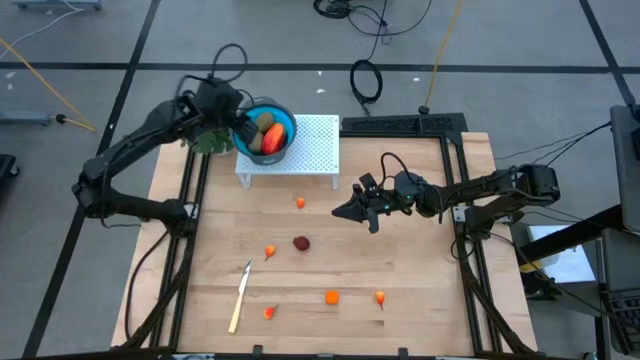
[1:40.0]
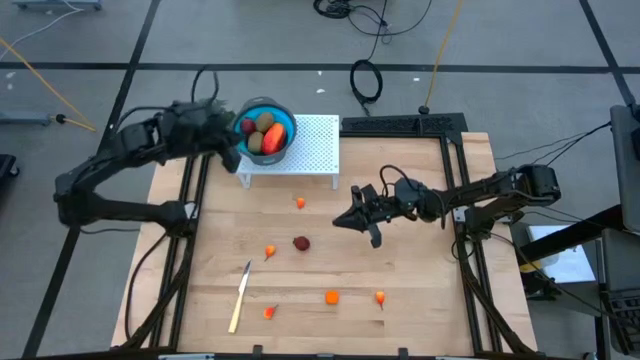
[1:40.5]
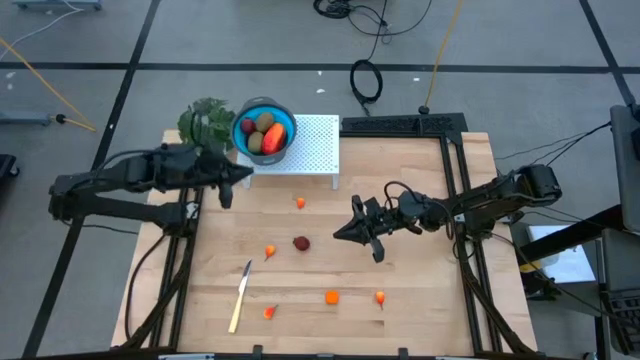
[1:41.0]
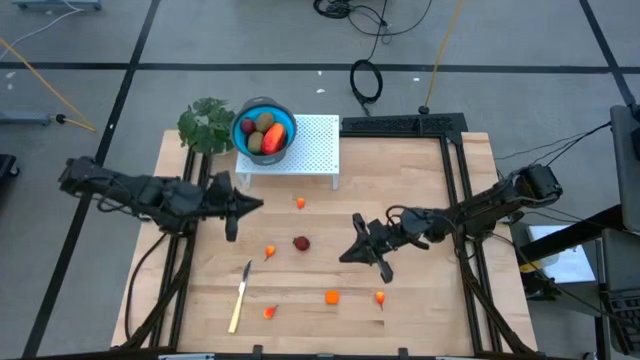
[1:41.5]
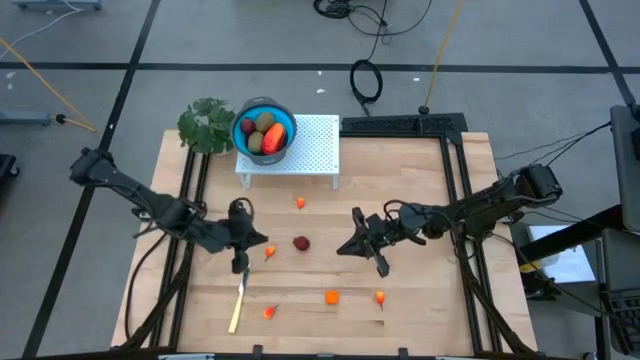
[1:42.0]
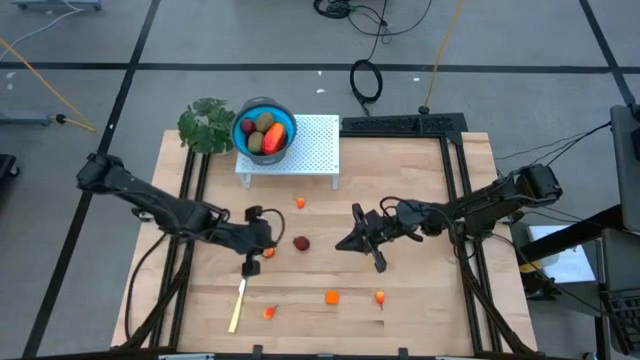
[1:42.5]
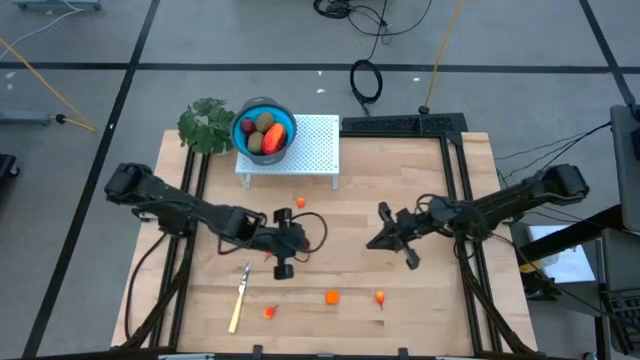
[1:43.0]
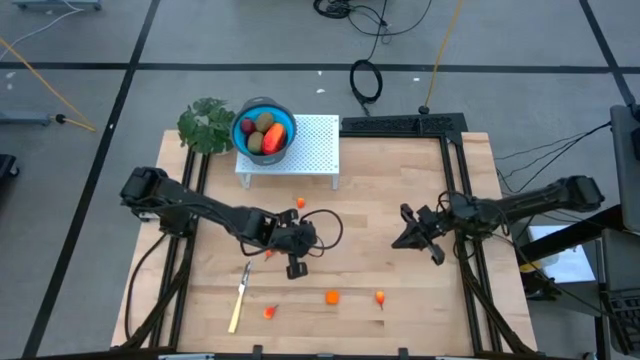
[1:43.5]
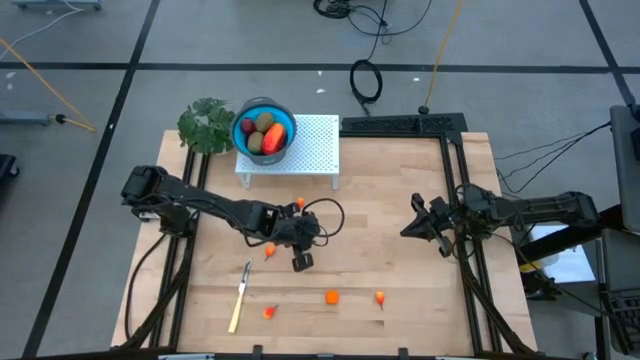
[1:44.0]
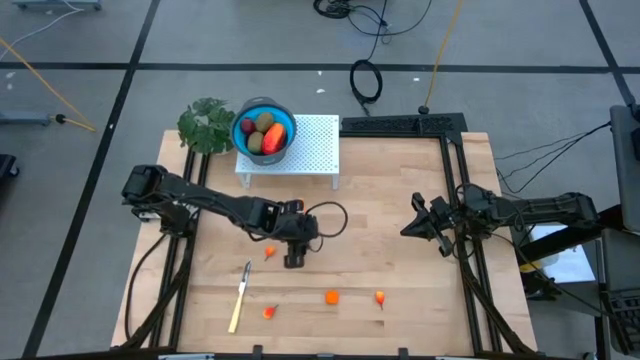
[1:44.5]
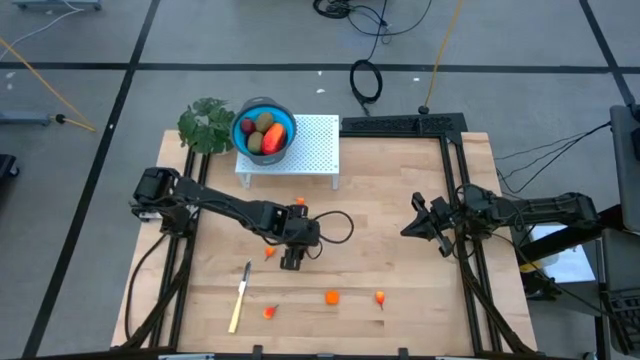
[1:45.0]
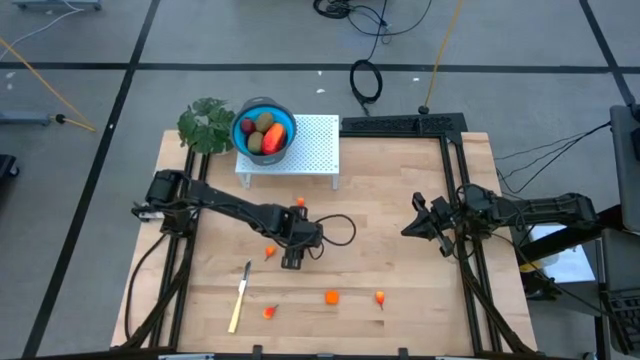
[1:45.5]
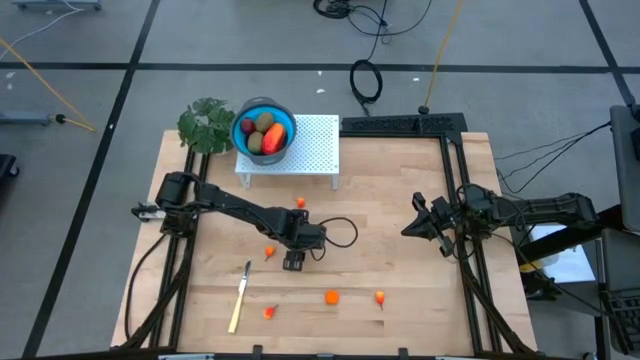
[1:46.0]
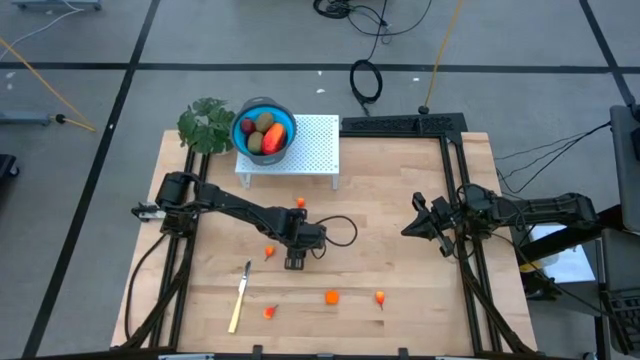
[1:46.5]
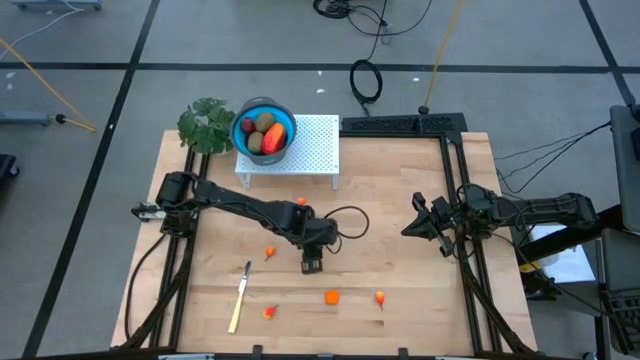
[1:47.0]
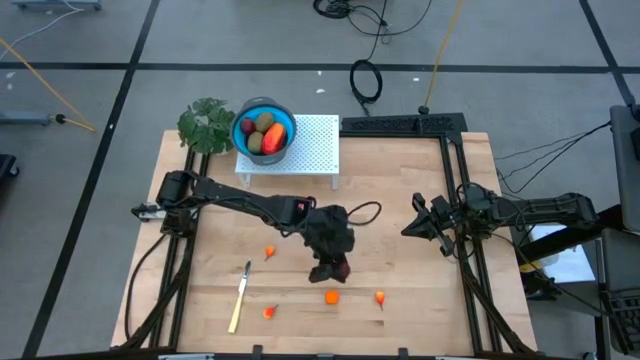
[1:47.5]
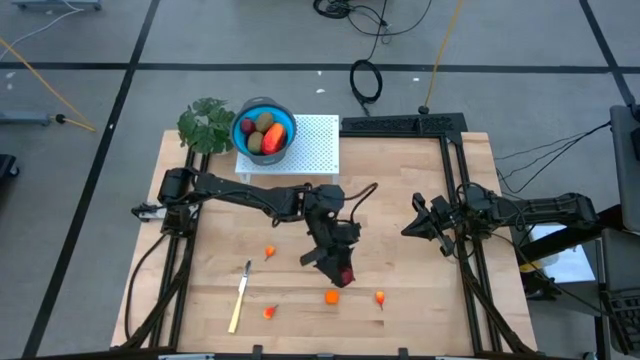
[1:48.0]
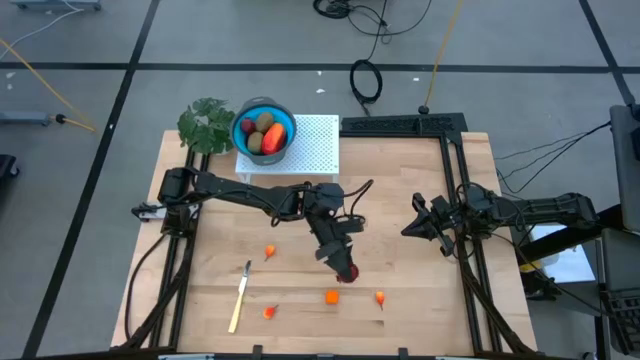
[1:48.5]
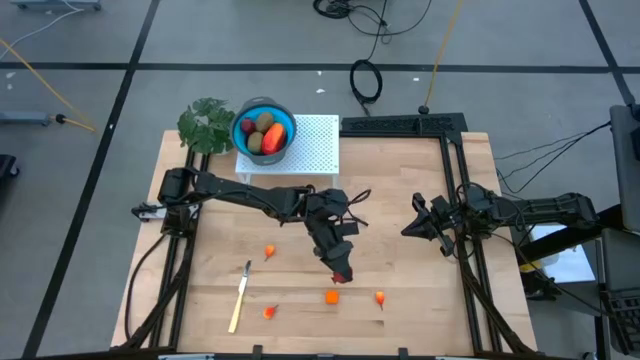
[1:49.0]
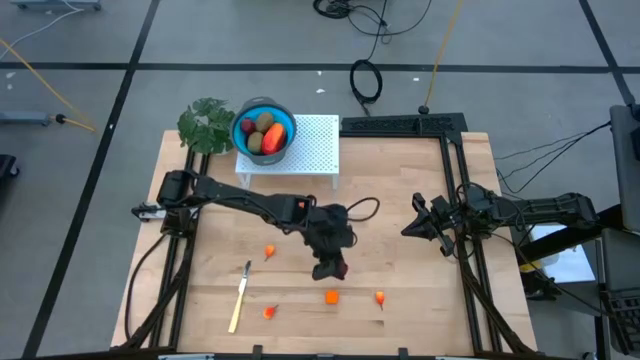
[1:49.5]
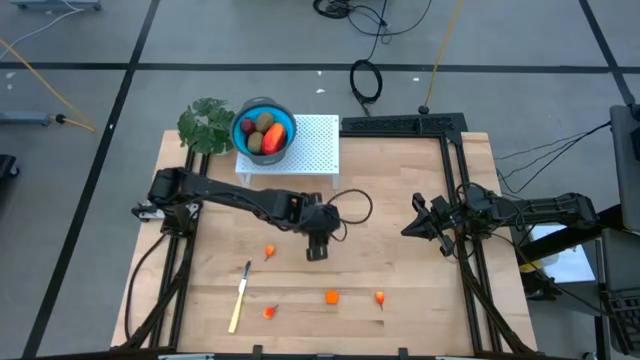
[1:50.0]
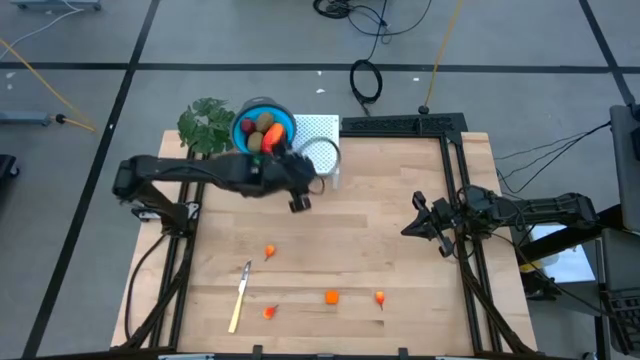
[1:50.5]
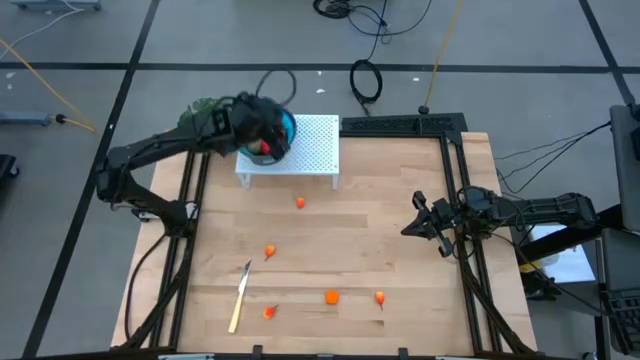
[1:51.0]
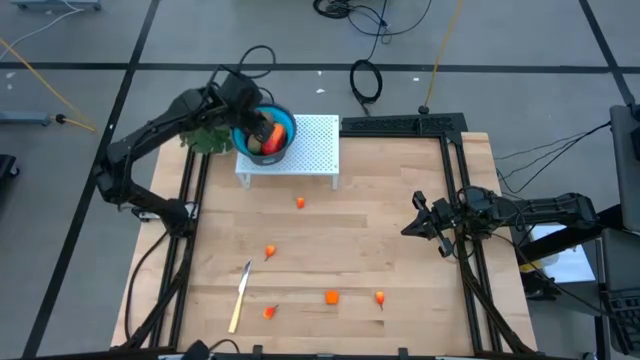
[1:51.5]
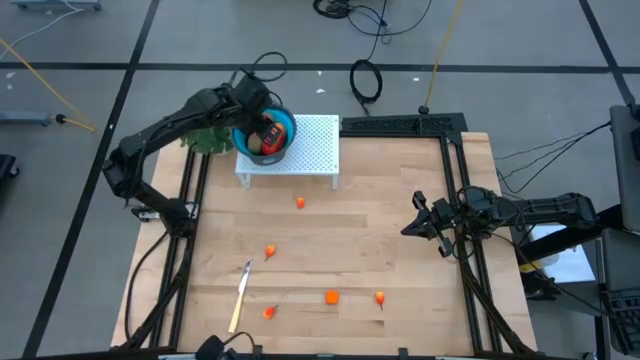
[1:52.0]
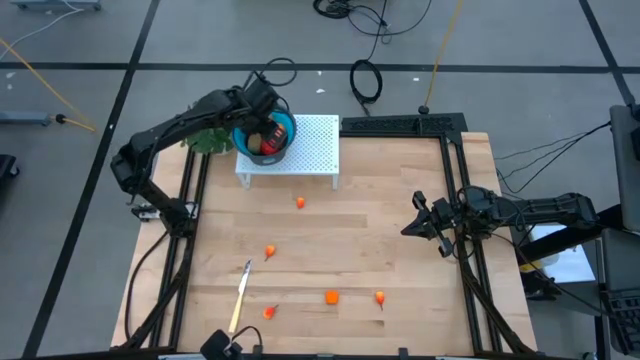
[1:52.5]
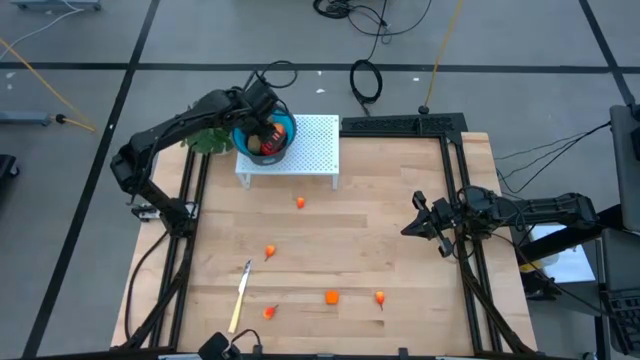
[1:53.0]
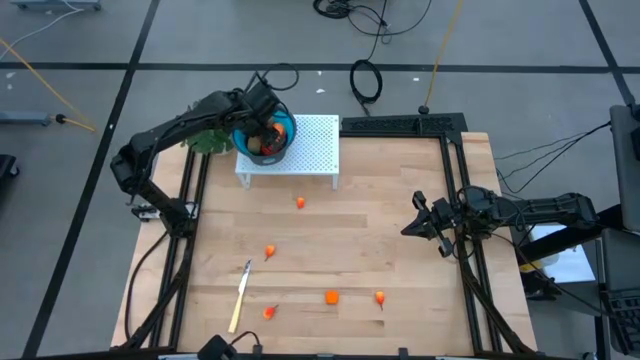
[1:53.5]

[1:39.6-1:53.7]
Task: Pick & Place Fruit
Put the pomegranate into the blue strainer bowl on the shelf

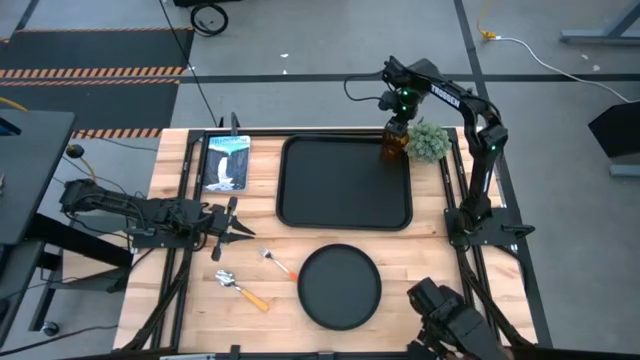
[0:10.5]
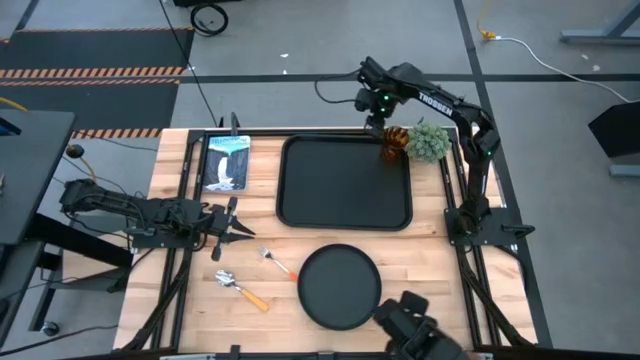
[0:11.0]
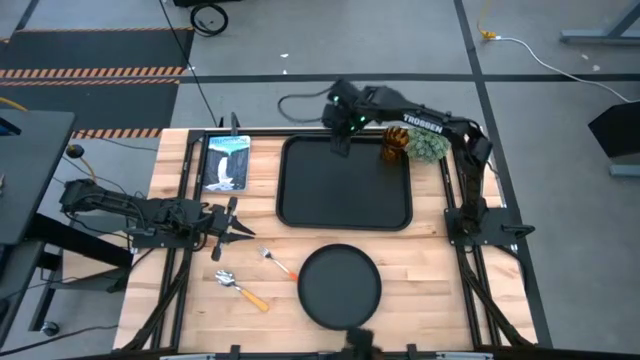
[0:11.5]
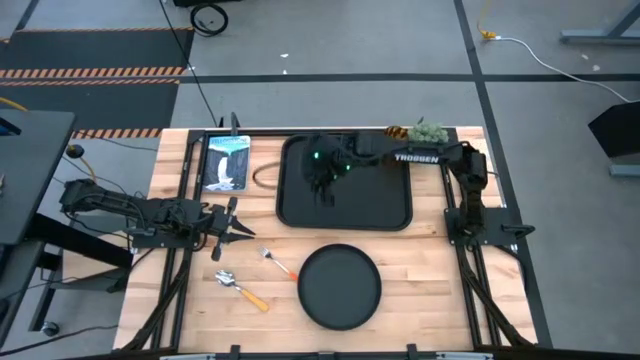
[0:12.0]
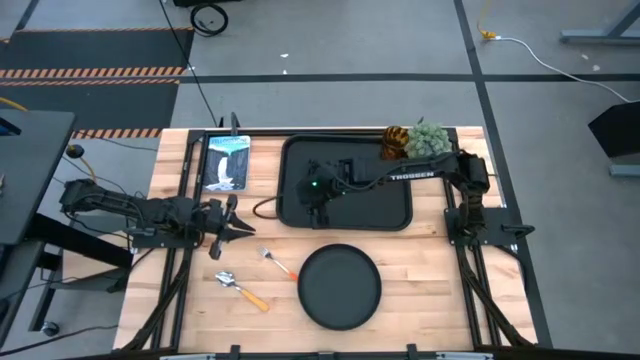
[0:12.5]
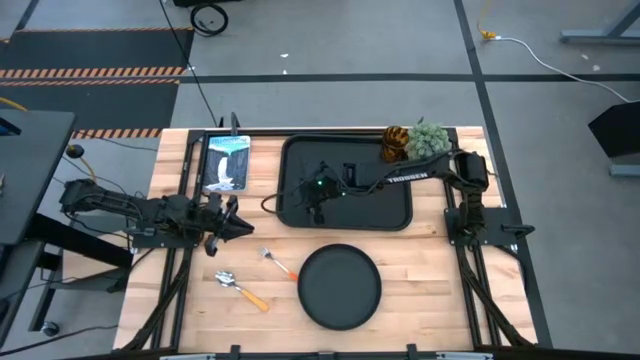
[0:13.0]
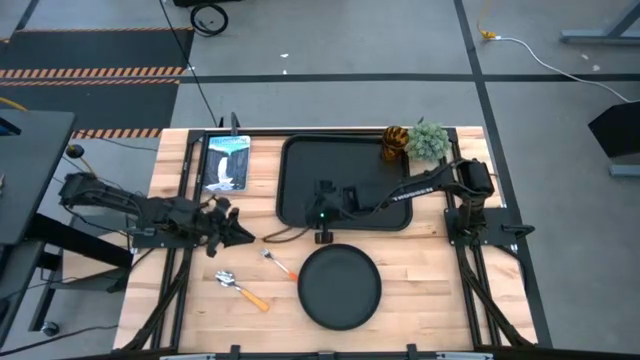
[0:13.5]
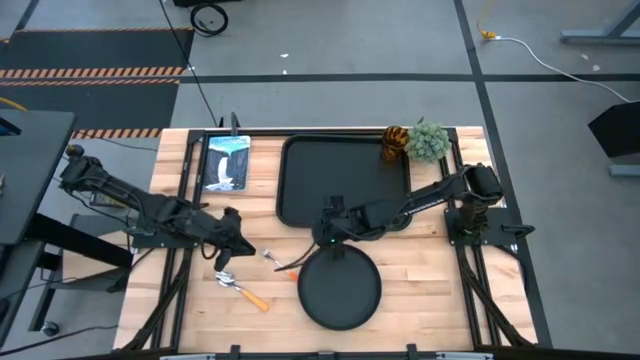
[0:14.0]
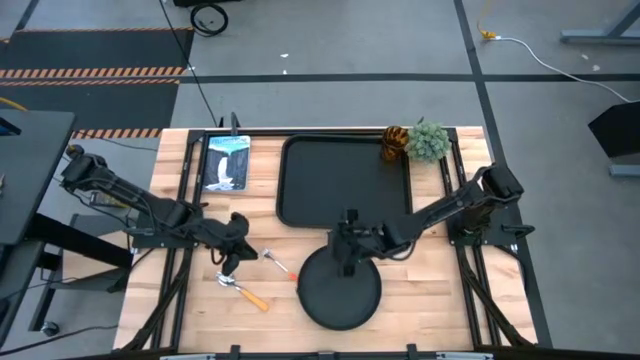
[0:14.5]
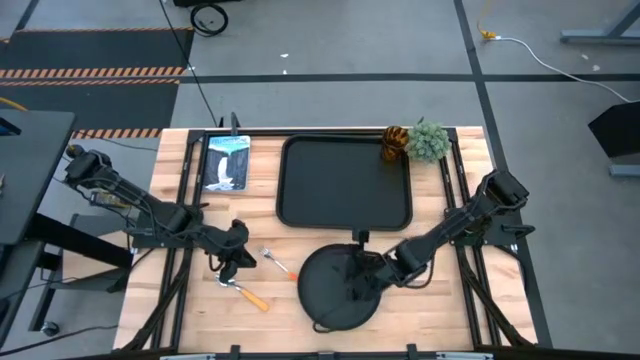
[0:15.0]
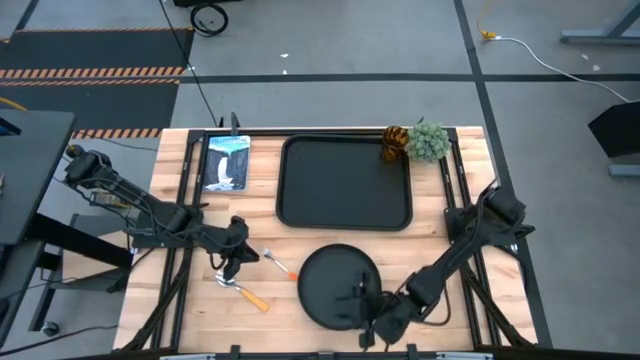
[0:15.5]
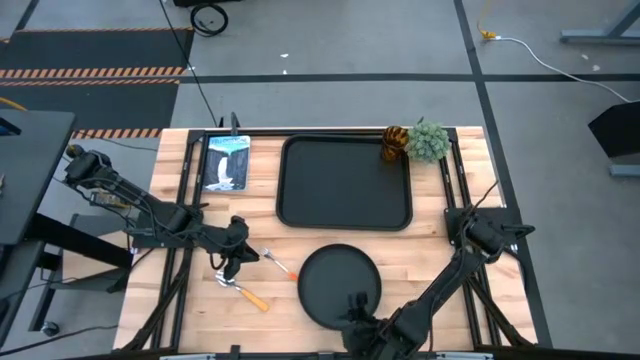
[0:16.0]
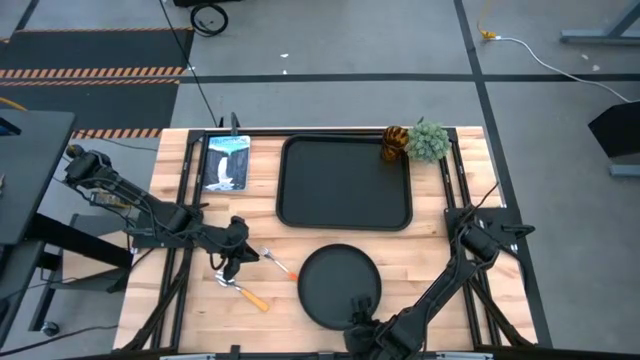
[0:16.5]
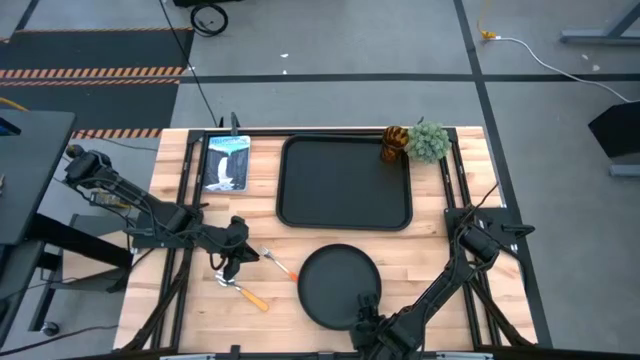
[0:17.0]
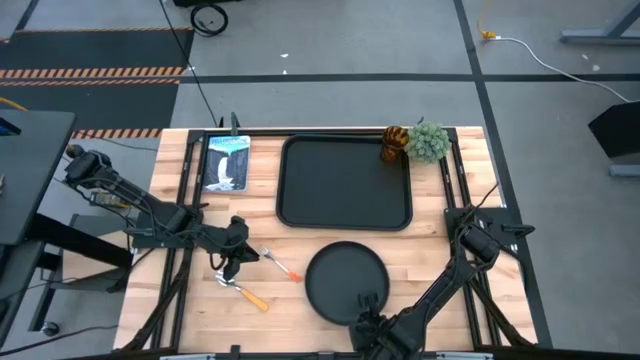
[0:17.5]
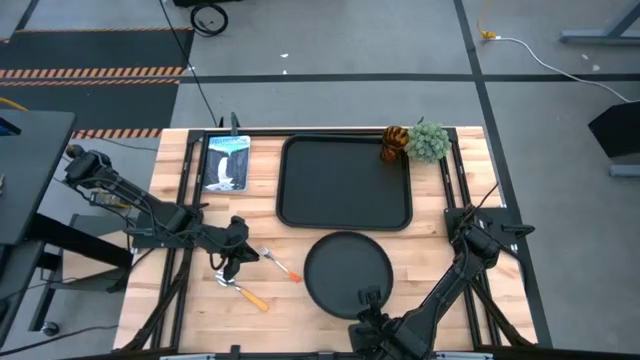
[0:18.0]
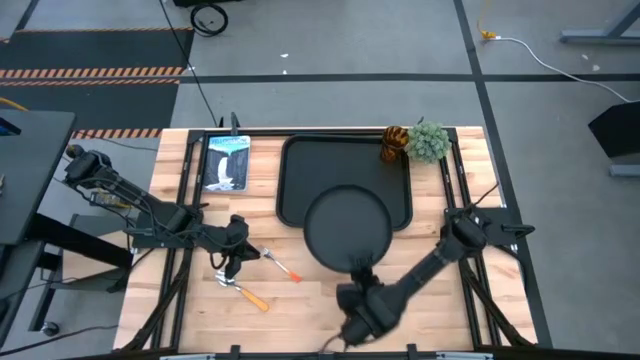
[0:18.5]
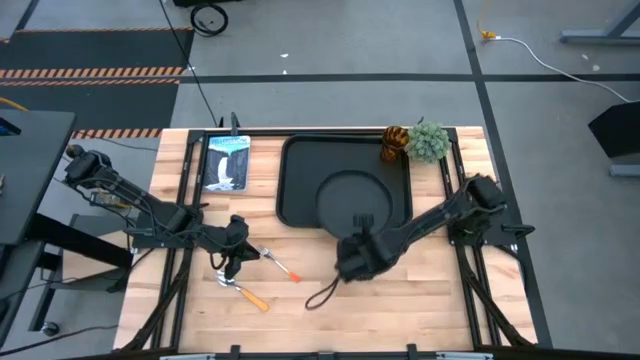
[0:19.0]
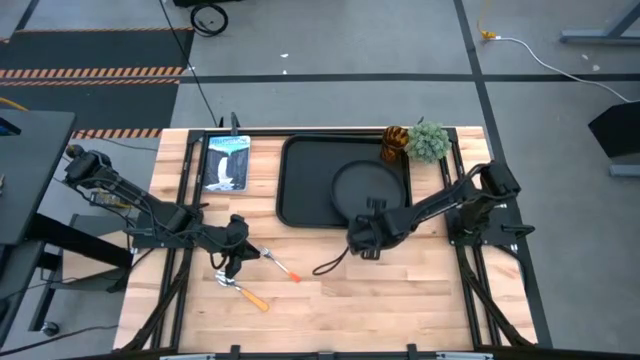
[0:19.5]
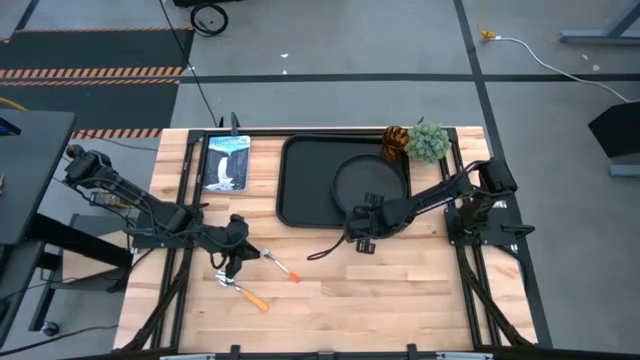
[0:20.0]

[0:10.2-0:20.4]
Task: Pick and place plate/cup/fork/spoon on tray
Put the black plate on the black serving tray
